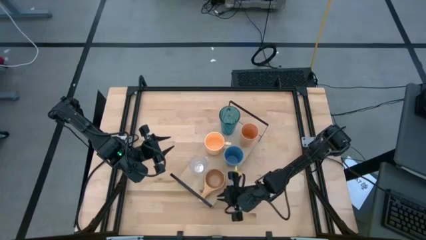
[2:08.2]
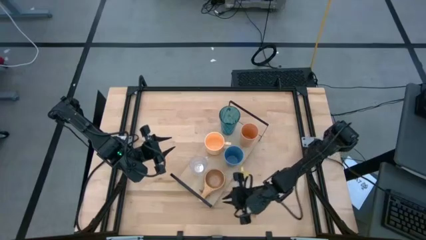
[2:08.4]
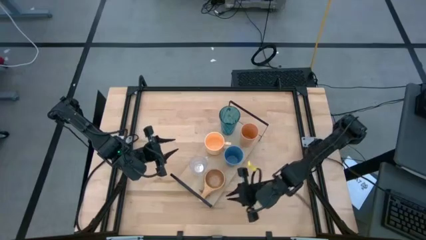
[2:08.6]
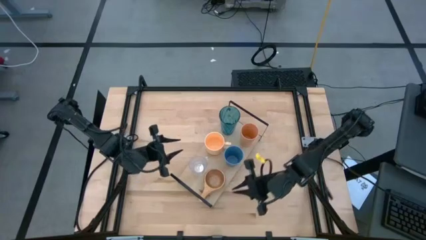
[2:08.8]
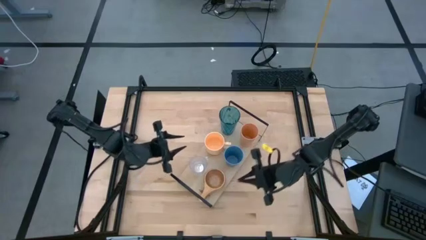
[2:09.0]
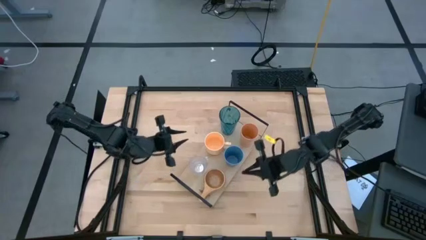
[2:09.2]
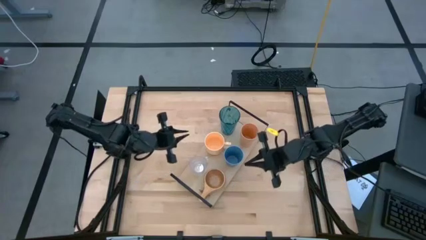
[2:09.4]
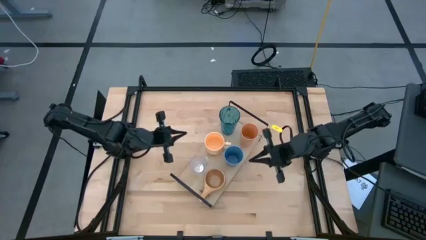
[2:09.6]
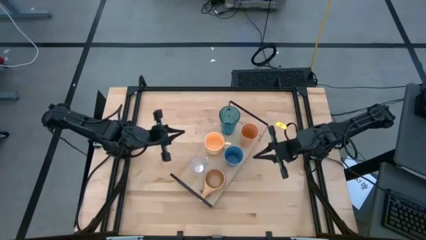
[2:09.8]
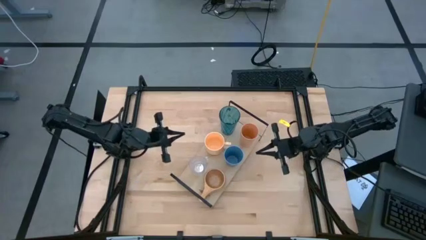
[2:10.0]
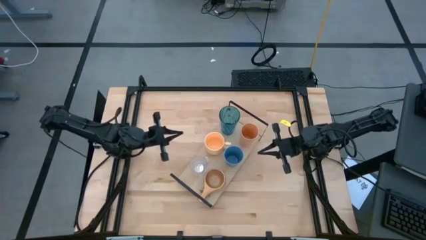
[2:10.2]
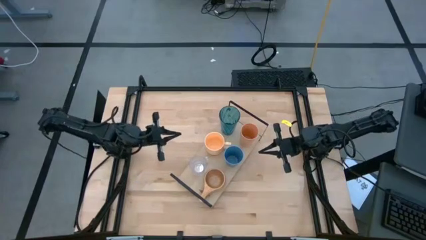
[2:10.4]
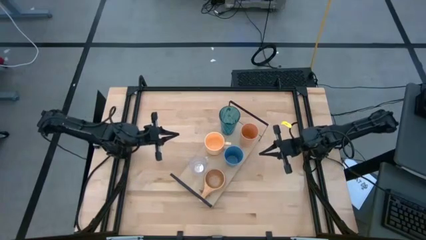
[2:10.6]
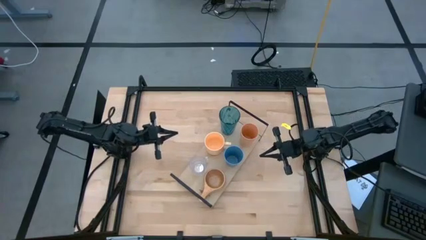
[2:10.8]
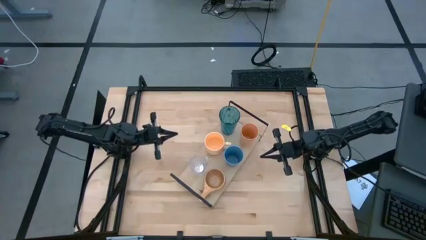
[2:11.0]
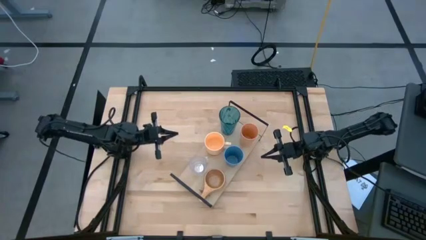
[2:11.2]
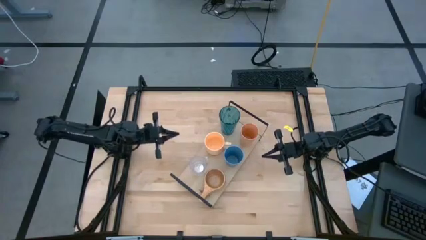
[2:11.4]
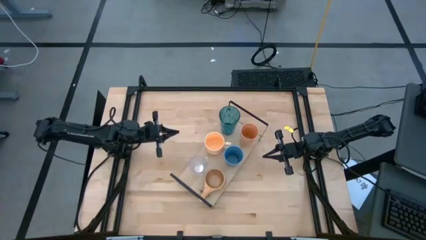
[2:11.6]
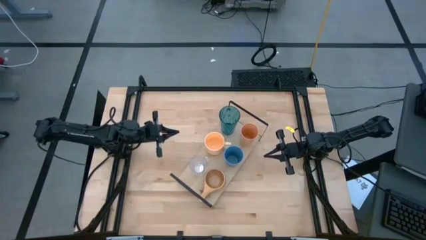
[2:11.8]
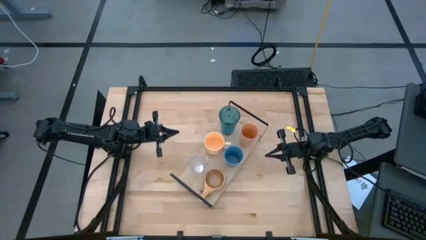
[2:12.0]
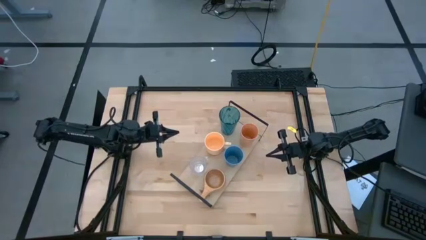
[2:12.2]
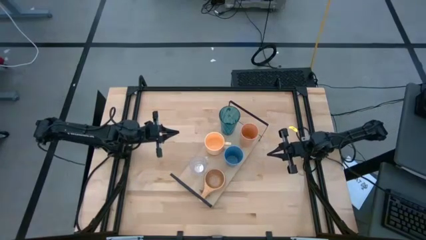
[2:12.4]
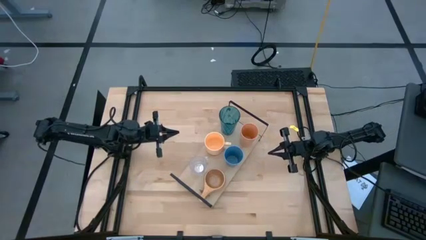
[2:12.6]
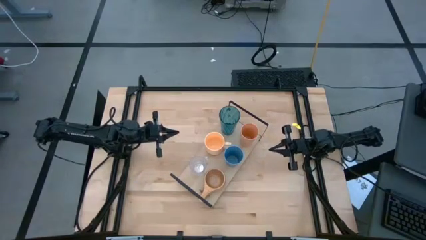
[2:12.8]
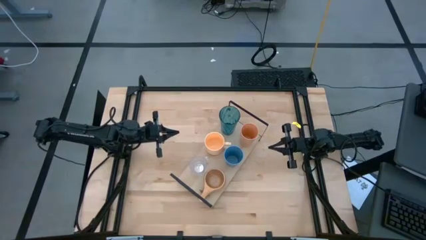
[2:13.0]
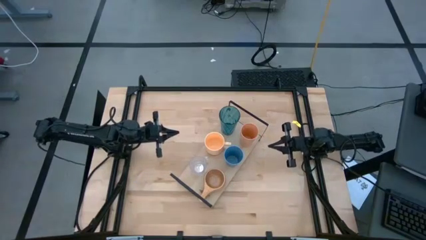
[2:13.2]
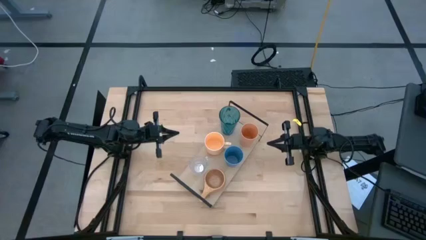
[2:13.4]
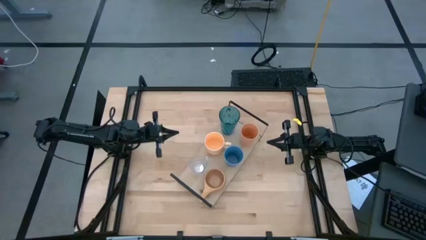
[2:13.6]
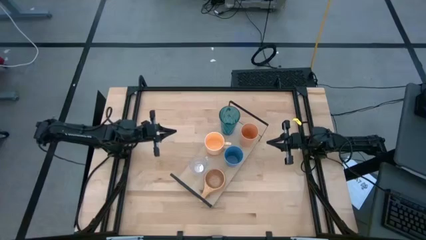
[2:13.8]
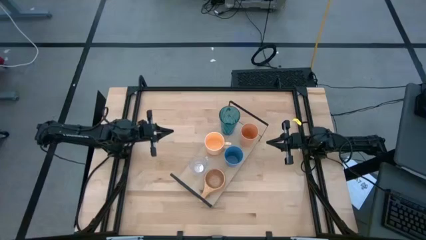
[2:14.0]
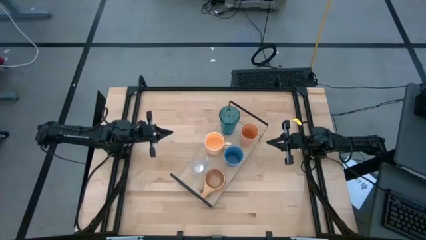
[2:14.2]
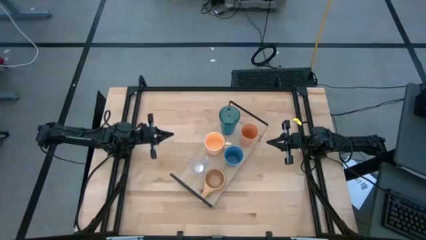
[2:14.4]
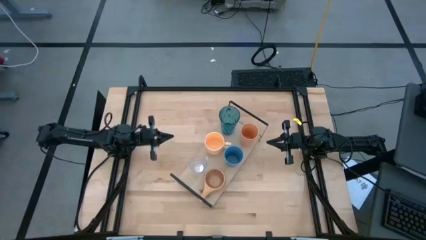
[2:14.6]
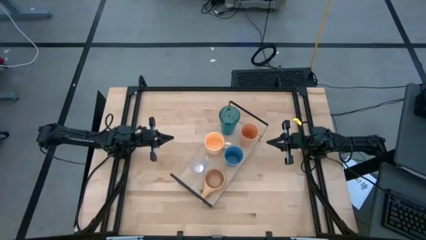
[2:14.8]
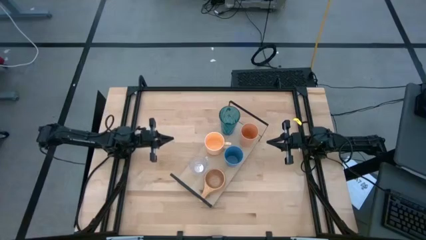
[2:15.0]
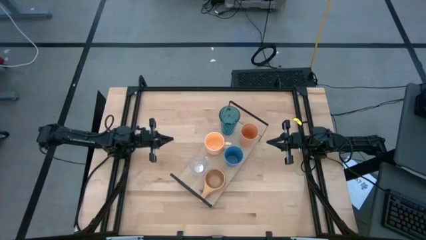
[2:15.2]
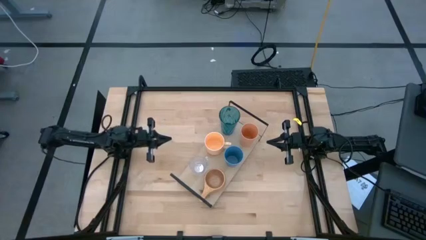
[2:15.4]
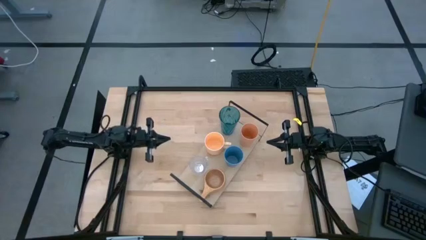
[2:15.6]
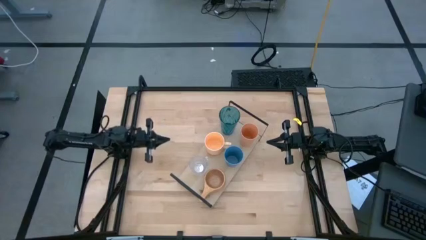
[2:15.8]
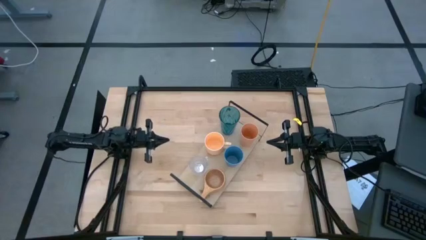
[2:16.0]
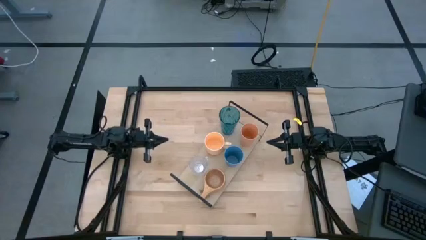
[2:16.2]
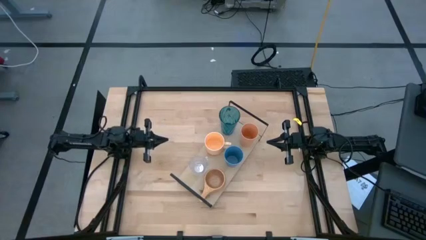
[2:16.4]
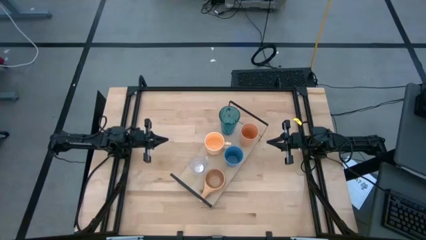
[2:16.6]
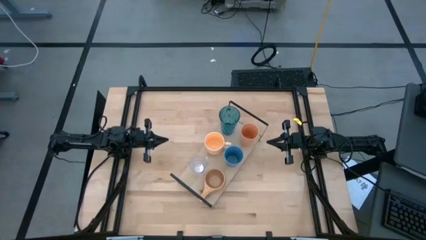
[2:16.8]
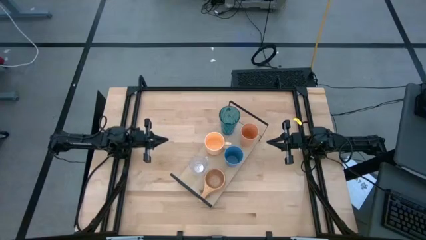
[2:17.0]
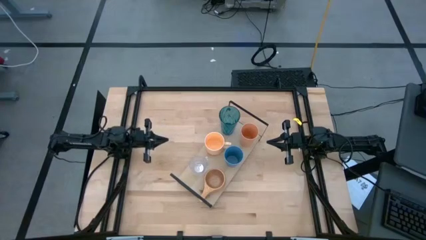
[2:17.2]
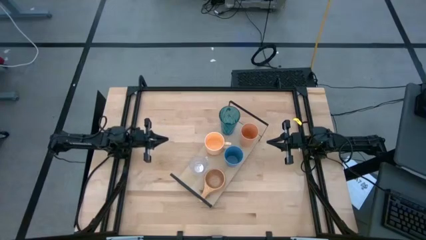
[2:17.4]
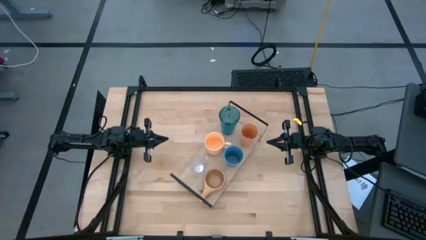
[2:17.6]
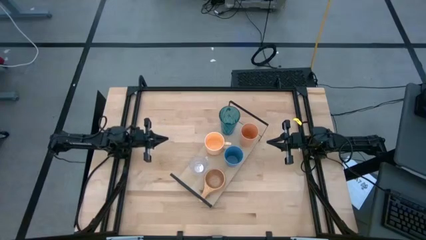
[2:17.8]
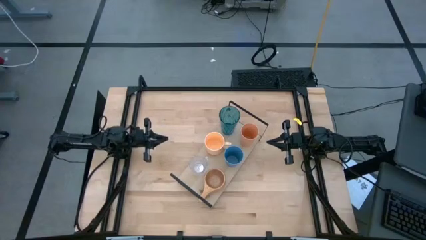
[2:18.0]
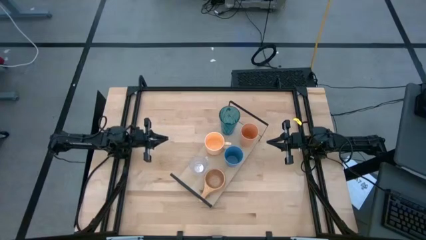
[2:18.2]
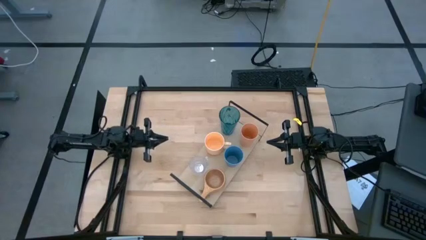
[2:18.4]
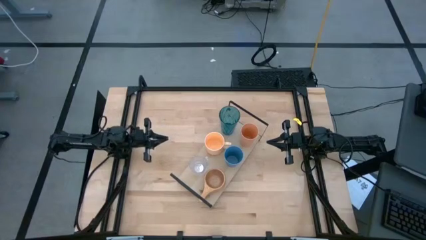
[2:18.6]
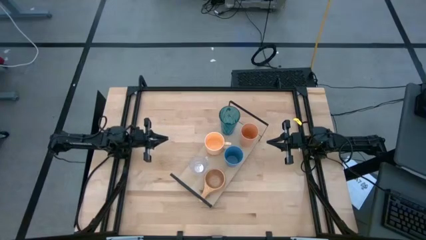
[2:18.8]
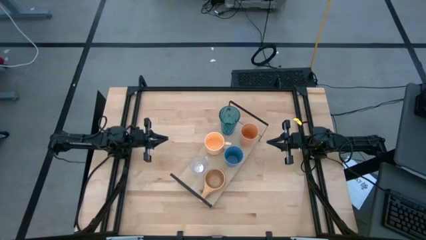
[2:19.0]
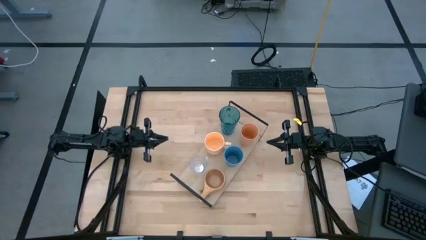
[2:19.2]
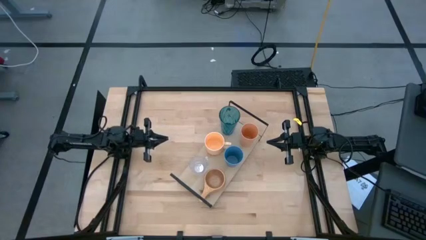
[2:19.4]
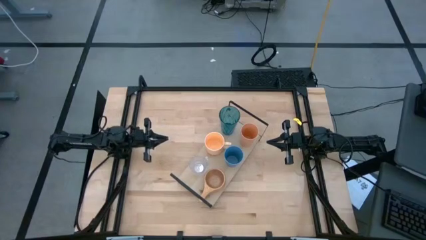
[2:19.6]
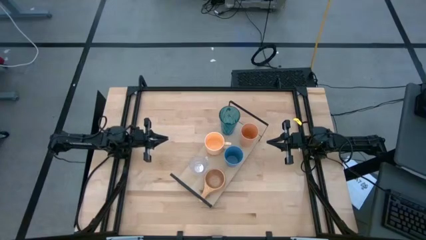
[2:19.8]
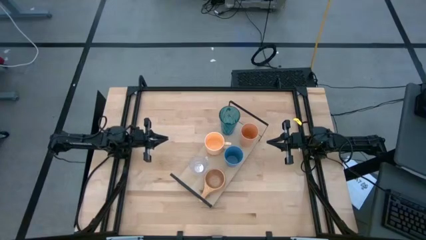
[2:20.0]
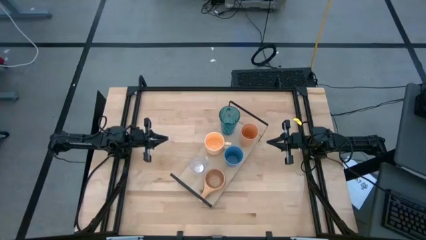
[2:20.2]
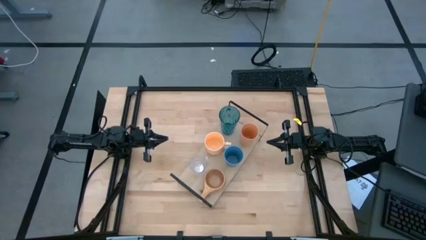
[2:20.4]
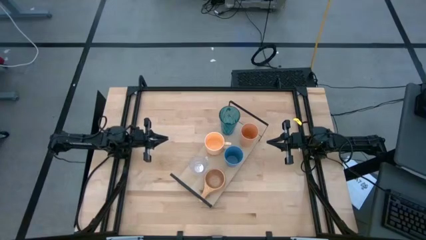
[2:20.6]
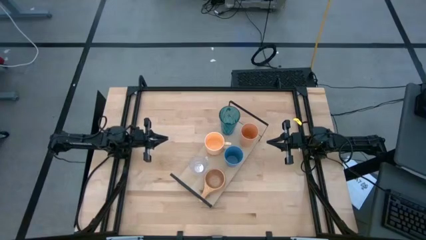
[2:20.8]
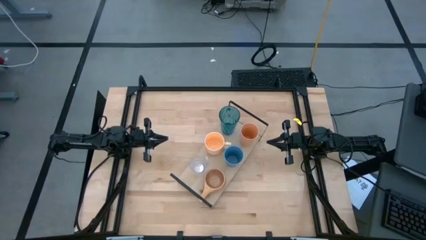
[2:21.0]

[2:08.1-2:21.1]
Task: Stack small to large cups/mugs on shelf
Return to Home Position

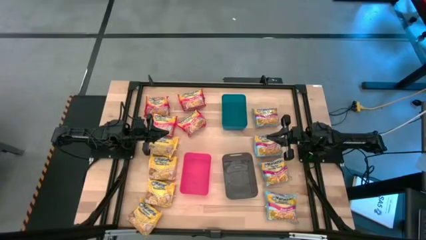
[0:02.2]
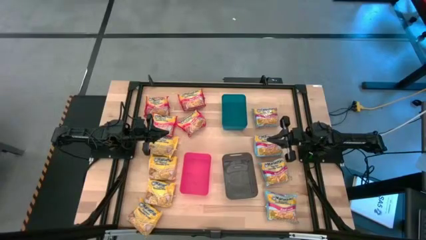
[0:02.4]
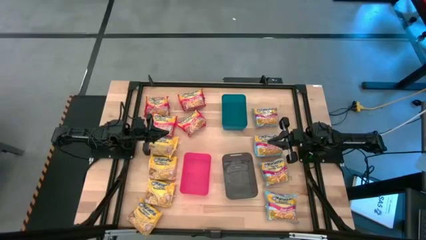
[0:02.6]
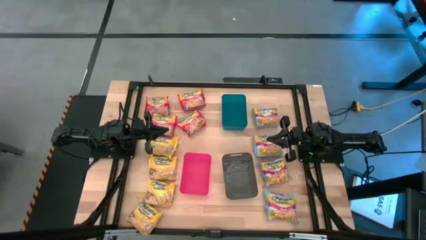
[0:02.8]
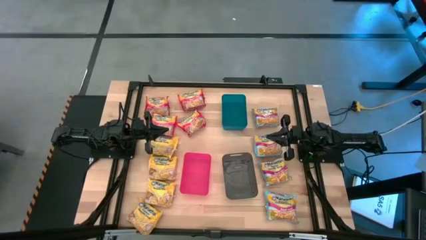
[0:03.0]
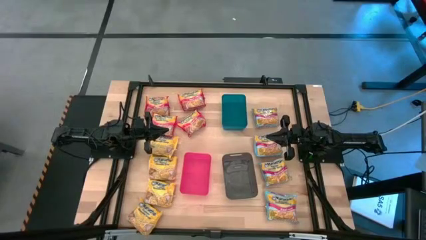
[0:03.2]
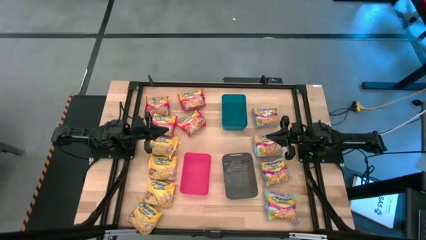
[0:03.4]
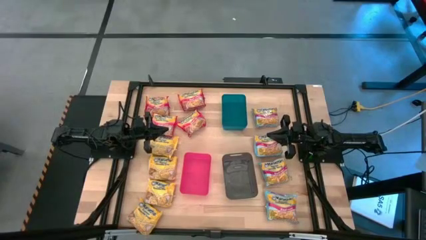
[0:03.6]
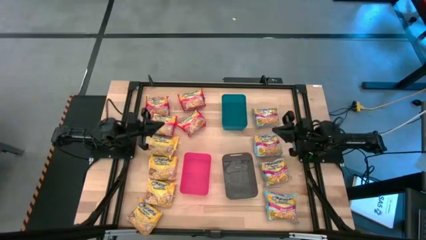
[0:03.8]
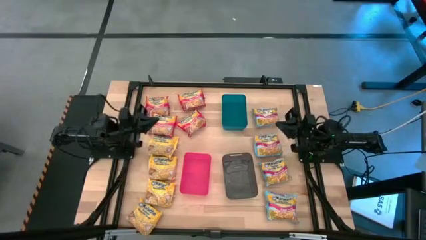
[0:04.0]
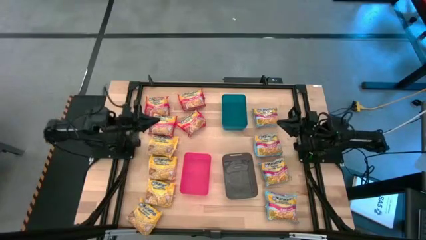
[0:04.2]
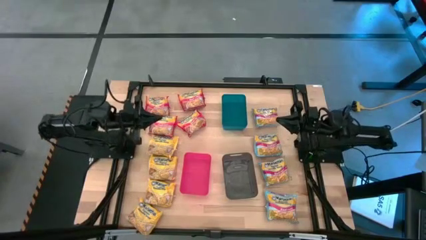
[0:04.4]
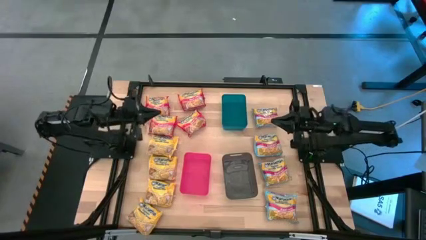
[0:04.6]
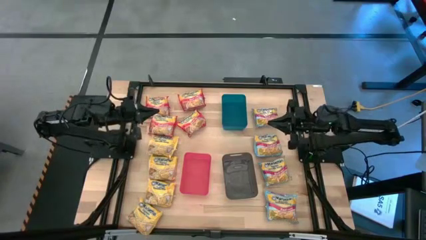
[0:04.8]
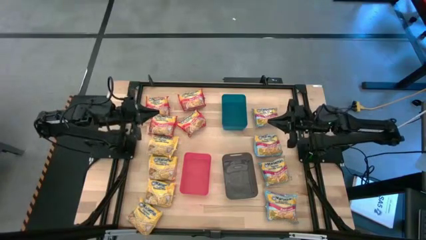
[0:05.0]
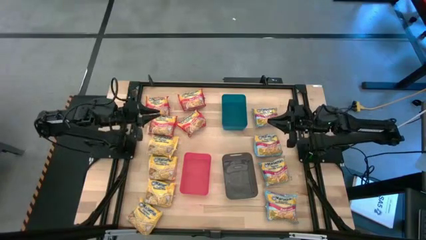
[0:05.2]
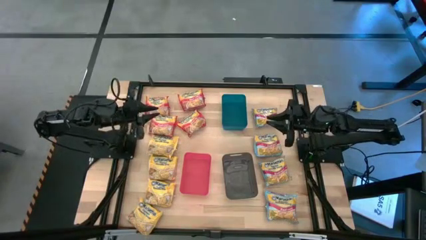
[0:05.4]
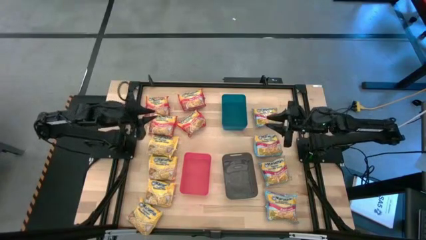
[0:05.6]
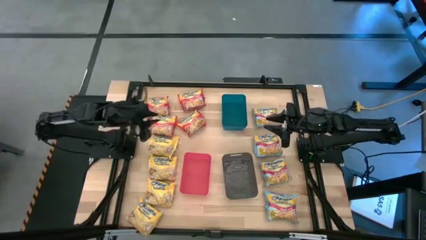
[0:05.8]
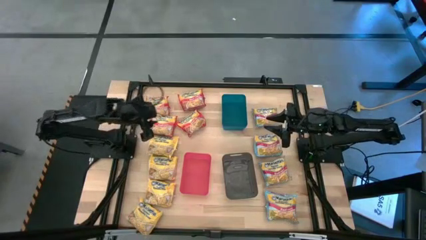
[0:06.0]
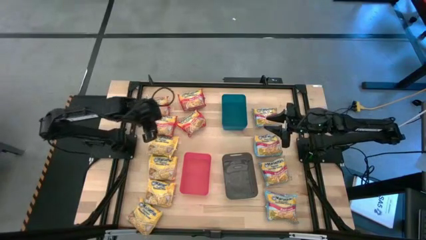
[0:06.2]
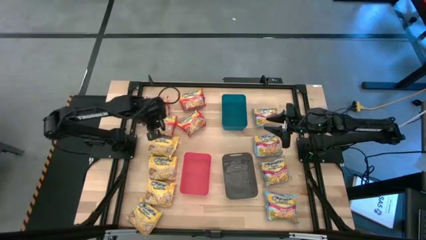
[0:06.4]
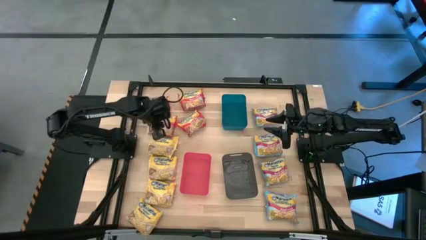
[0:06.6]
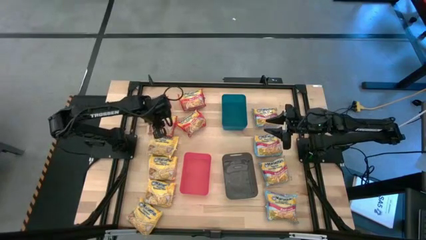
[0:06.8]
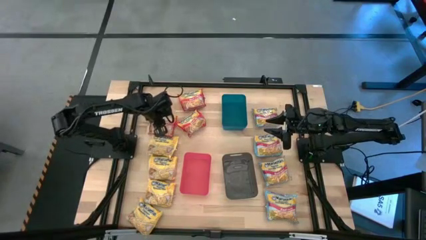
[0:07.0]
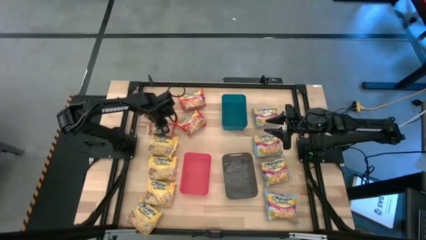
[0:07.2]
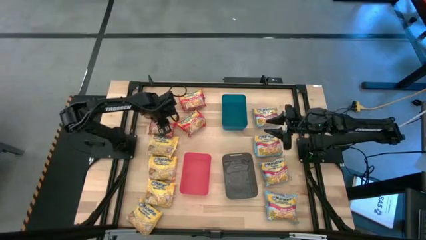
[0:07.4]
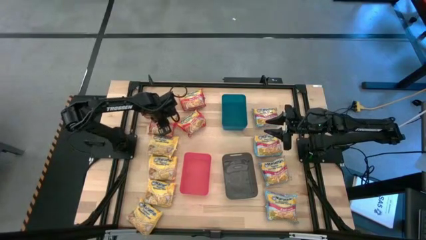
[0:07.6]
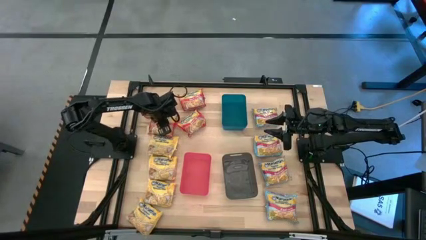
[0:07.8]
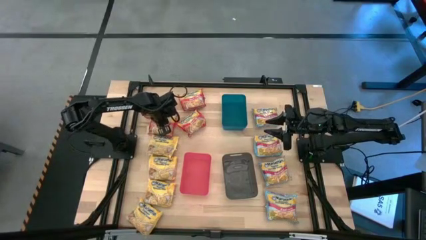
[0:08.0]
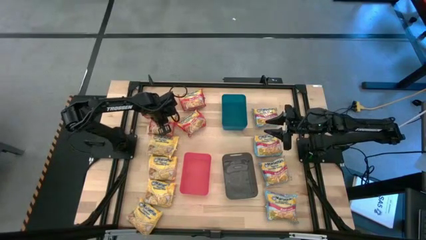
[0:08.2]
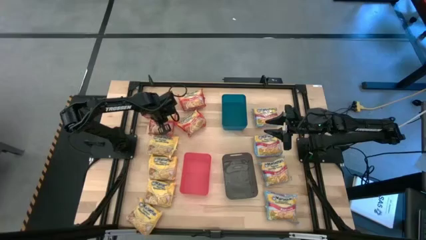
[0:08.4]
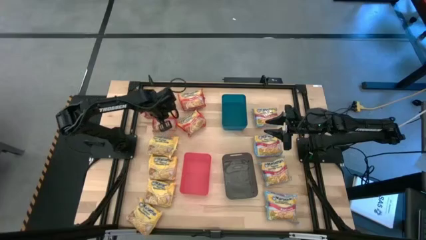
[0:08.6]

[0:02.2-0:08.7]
Task: Sort Maruchan noodles
Put the red bag into the red bin
